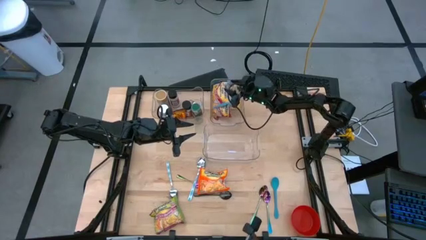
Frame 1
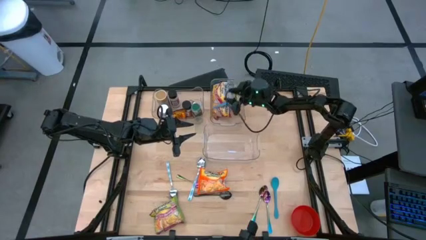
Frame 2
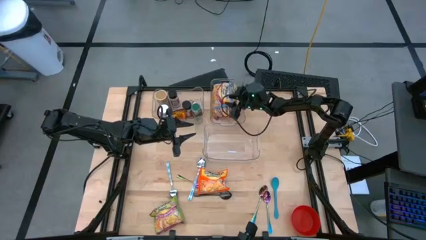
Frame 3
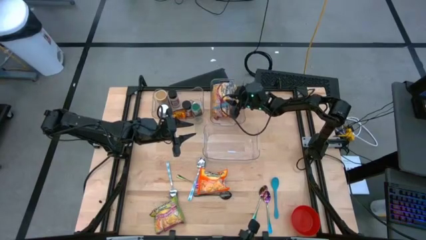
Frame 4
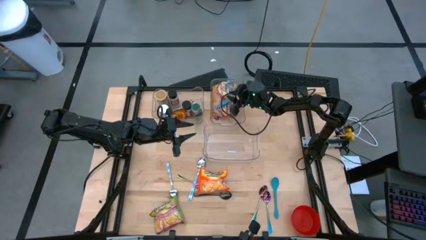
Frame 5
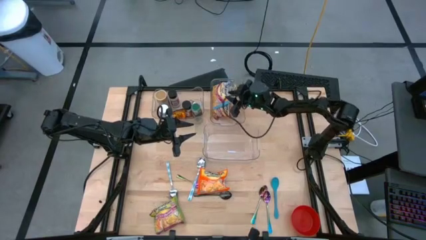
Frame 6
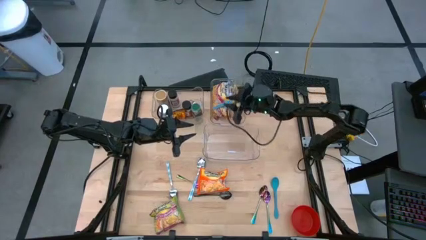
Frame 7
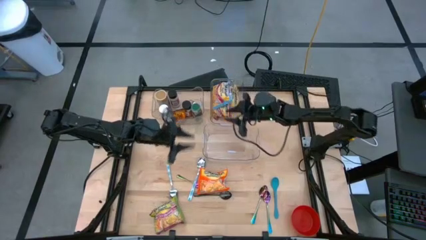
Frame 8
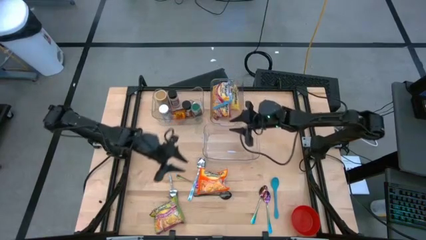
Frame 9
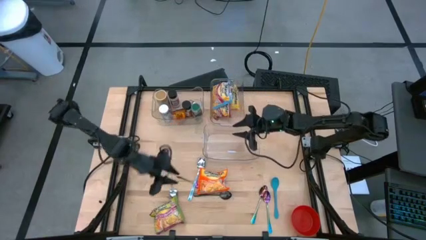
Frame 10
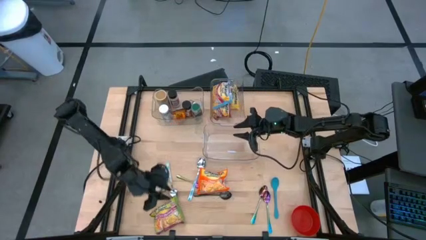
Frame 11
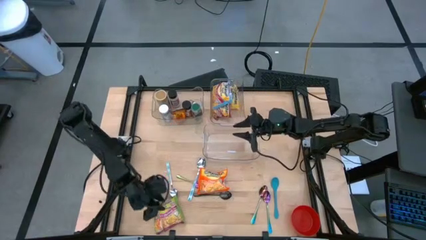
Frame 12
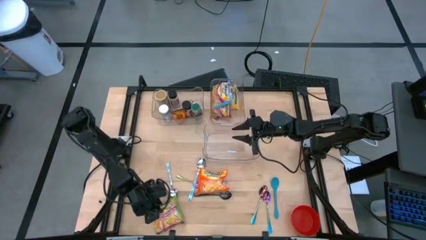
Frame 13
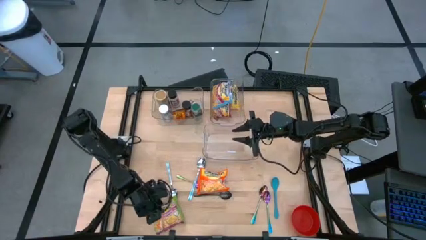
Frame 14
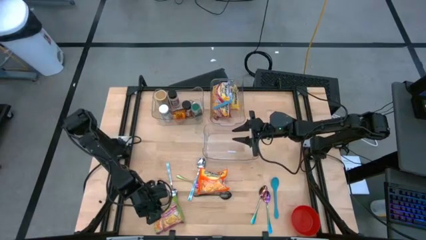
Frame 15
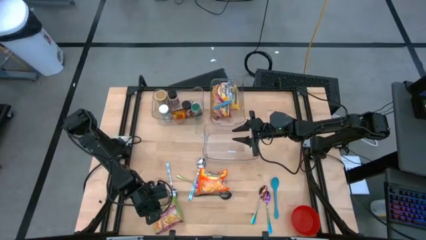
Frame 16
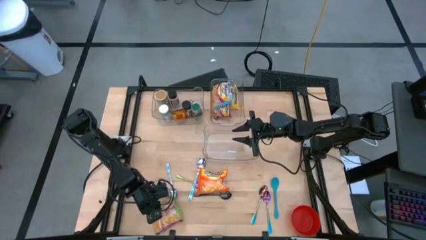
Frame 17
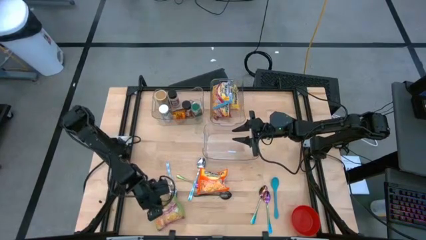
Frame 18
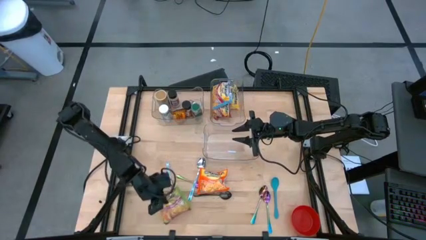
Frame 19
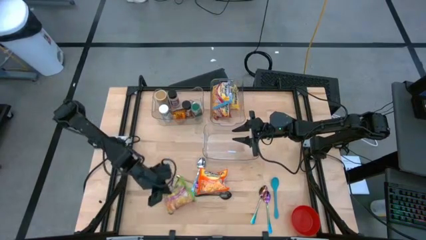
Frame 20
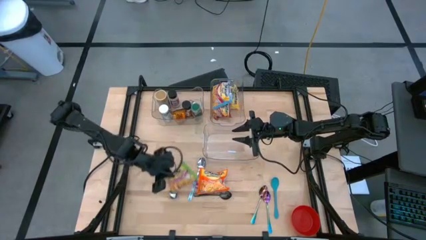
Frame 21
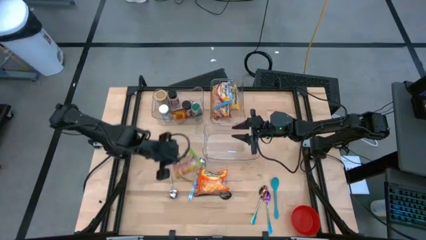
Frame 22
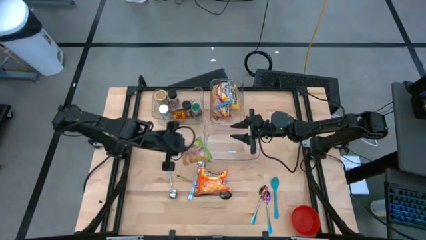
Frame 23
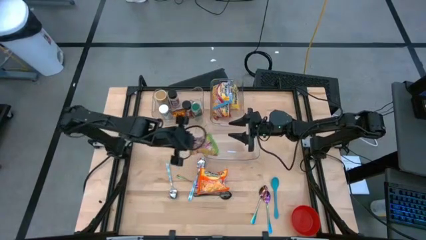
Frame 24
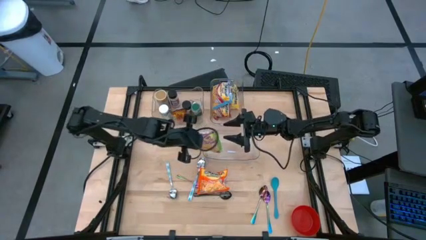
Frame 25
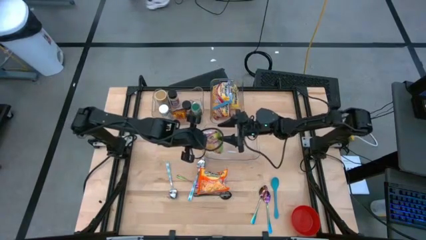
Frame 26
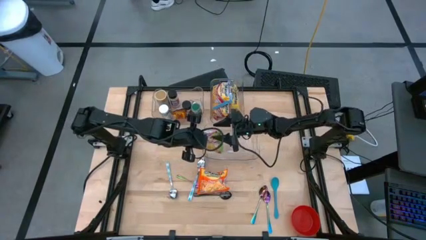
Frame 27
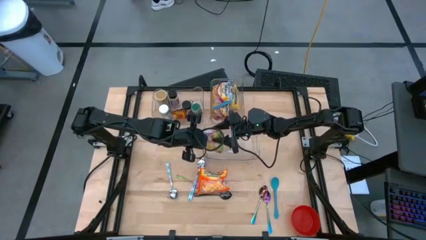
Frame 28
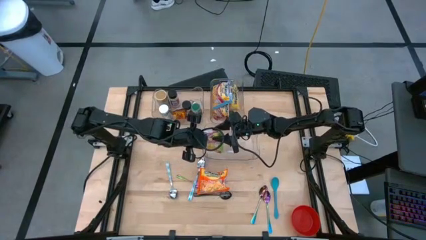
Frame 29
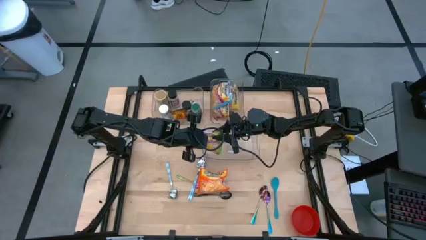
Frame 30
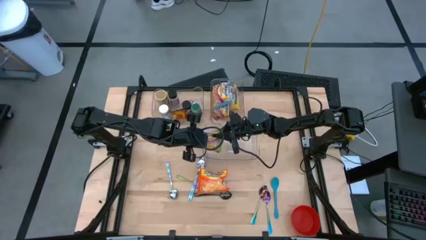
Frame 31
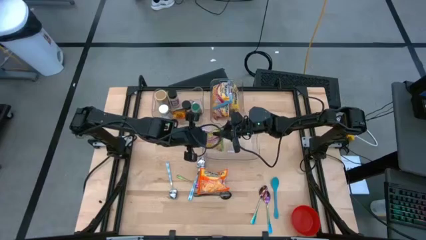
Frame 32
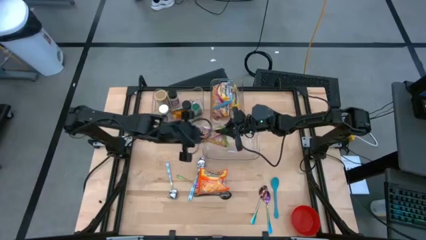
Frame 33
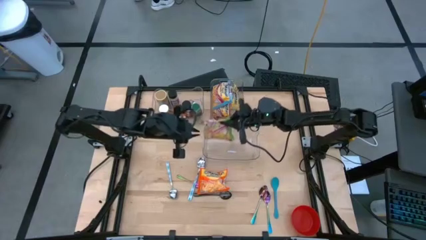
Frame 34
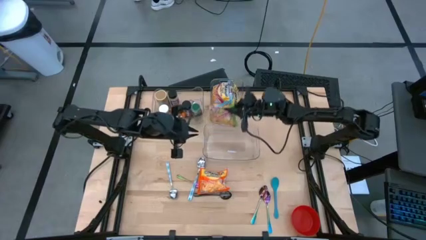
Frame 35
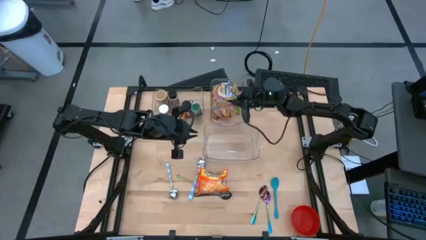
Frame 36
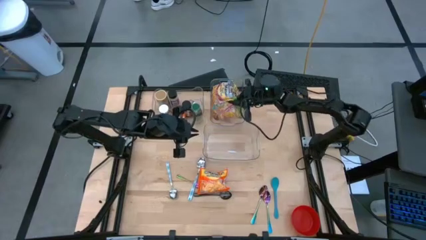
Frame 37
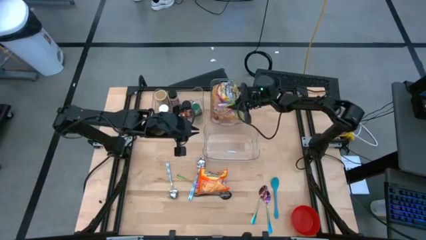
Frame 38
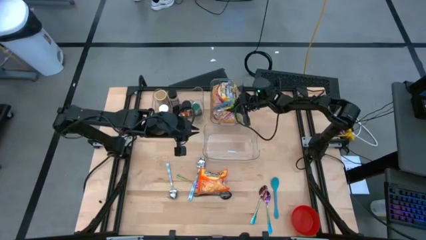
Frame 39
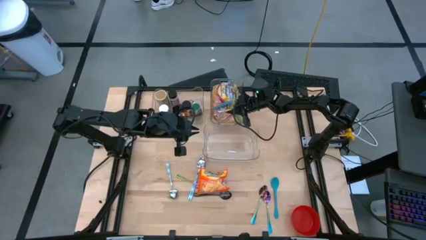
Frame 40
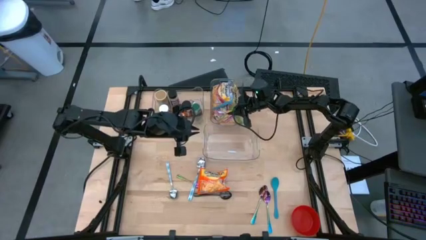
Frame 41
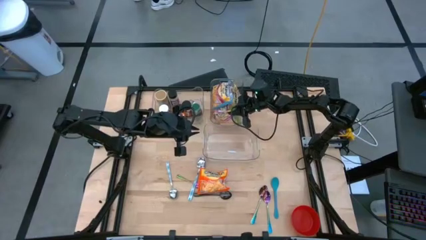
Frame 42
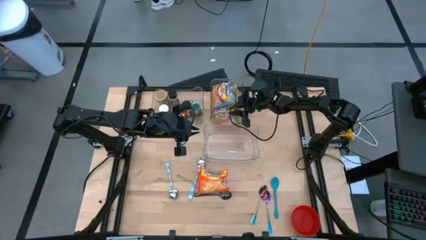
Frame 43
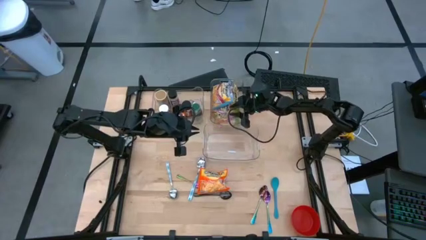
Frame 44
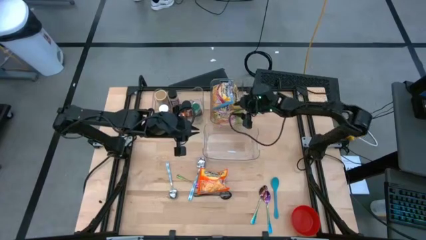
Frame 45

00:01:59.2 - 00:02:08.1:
Task: Pick & Place Food Item
Put the green noodle pack into the top right transparent container

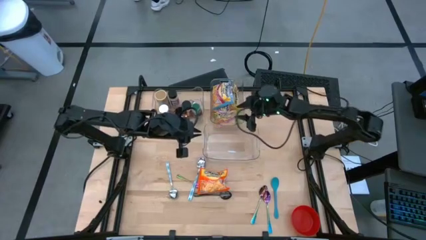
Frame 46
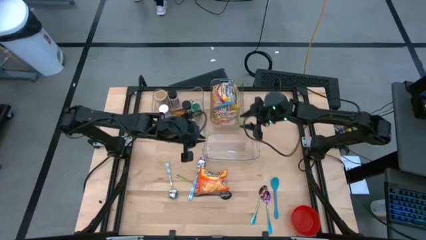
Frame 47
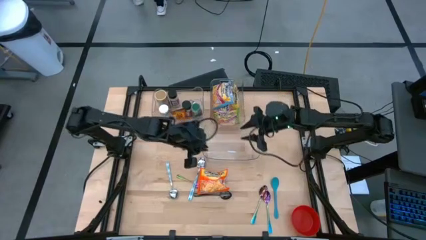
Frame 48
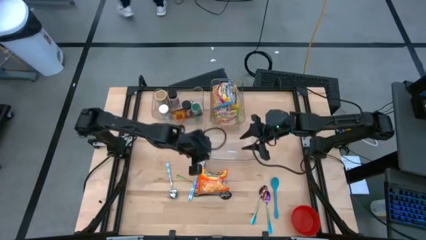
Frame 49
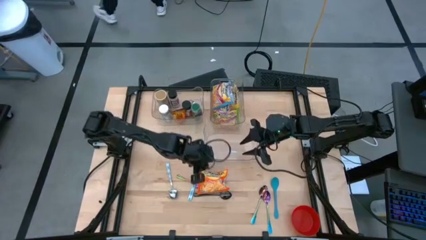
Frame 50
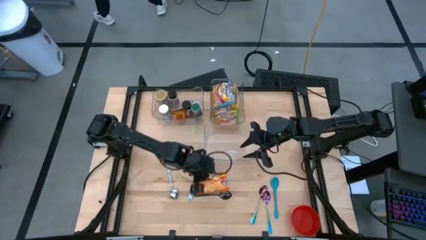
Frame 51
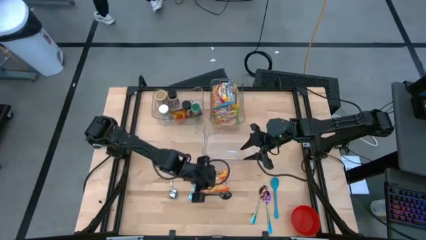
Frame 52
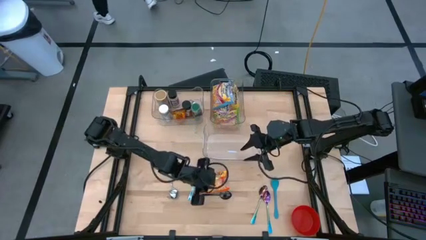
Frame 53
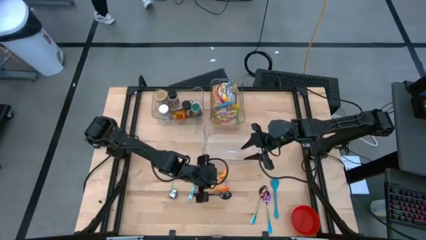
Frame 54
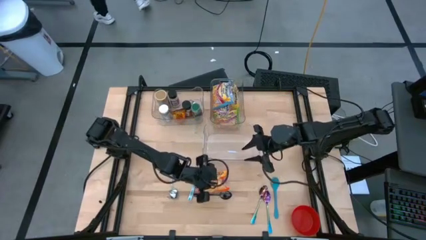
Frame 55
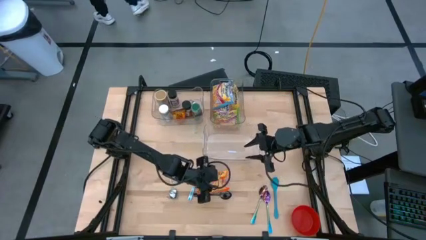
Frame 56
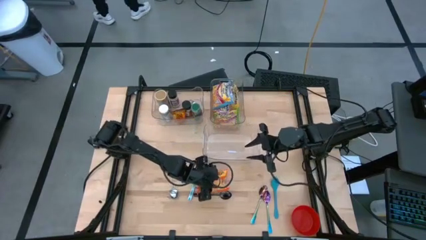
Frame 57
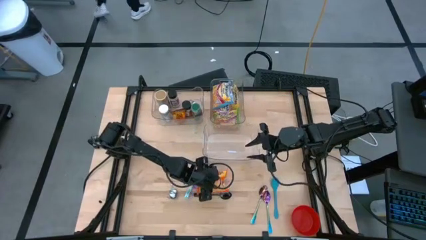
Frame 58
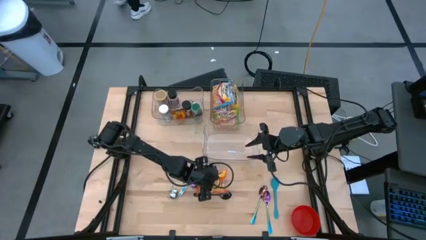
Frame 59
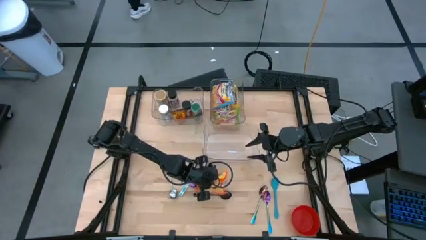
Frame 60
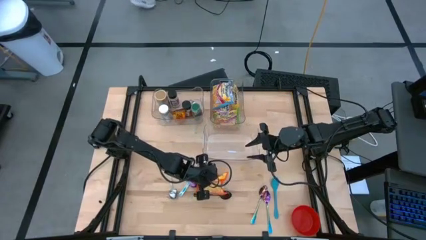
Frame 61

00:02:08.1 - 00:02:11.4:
Put the orange noodle pack into the top transparent container
